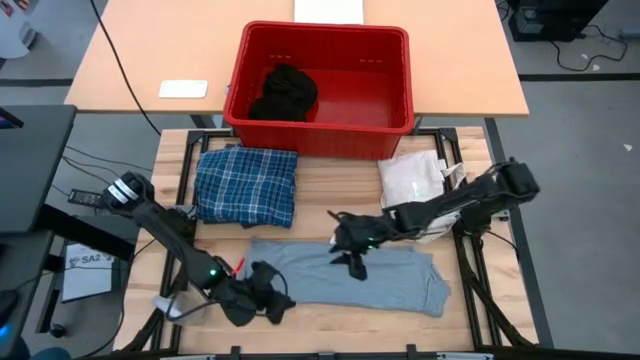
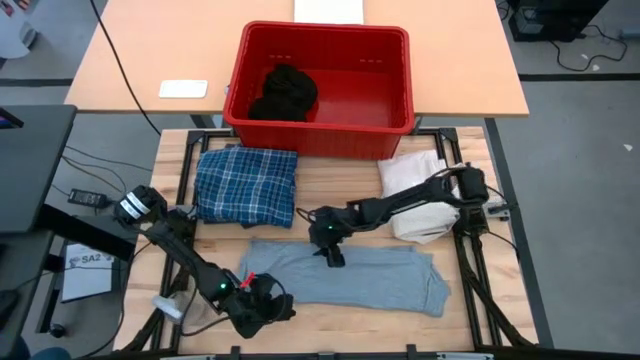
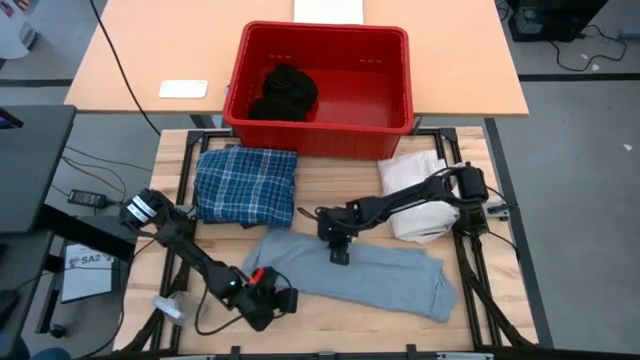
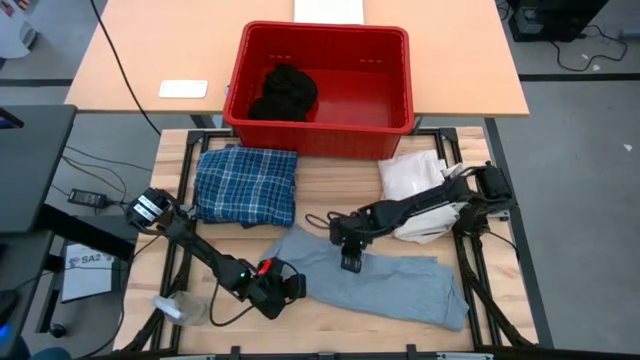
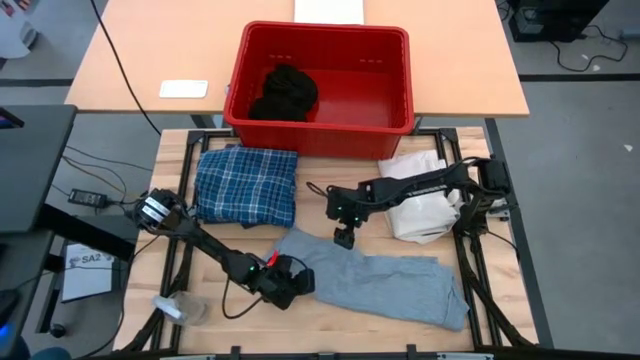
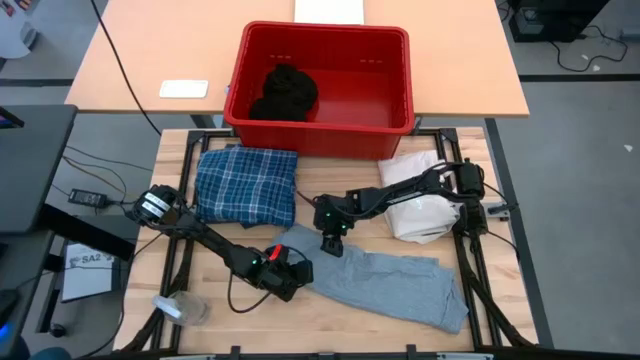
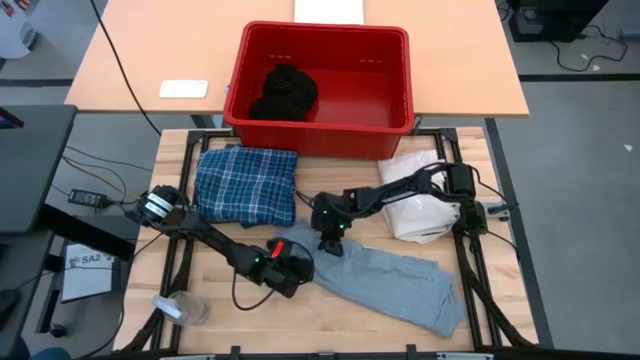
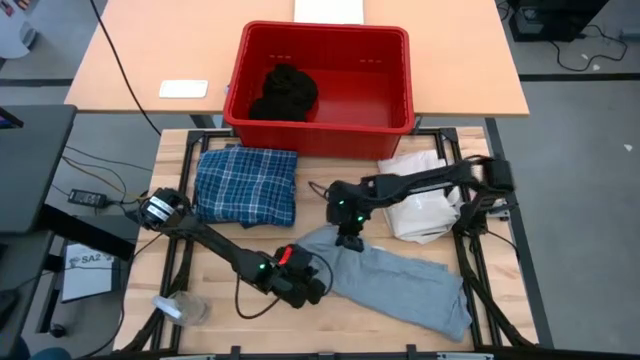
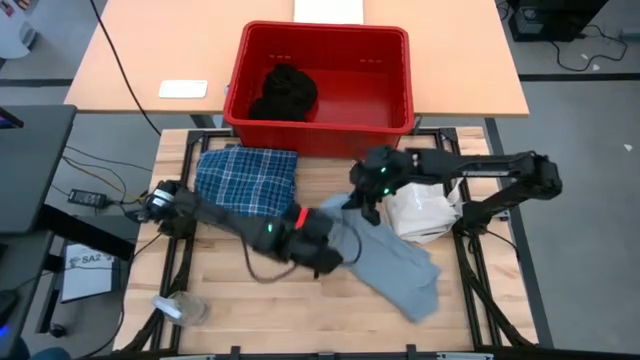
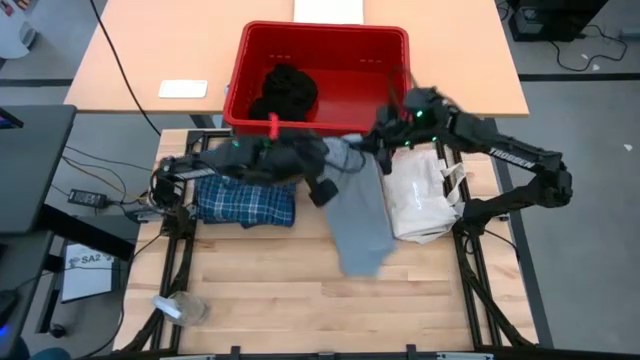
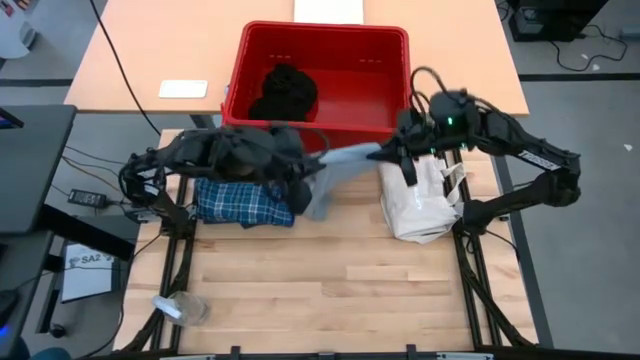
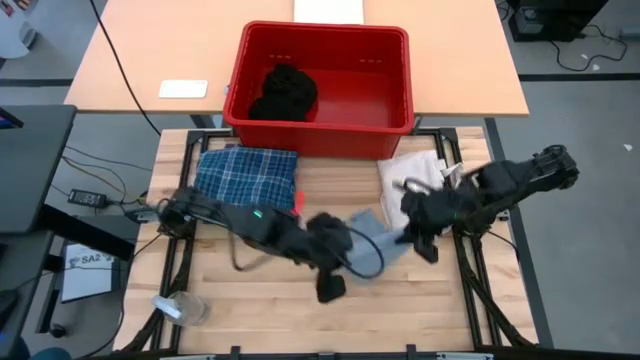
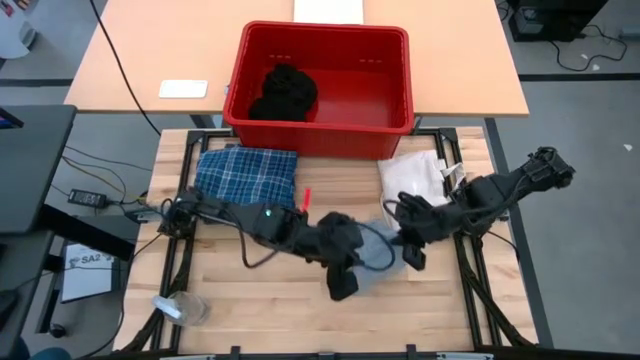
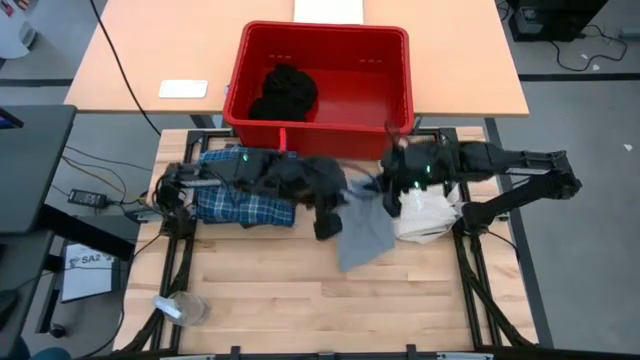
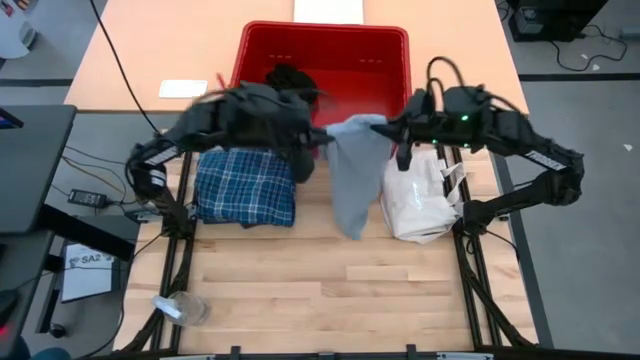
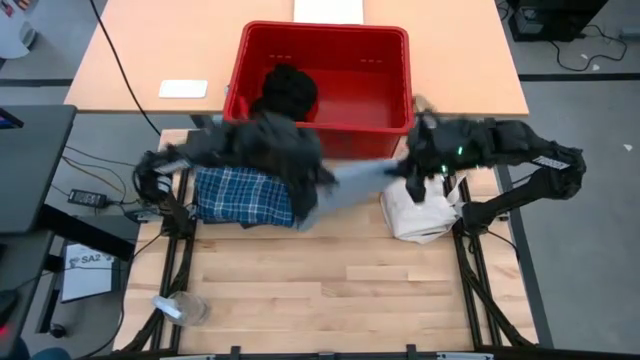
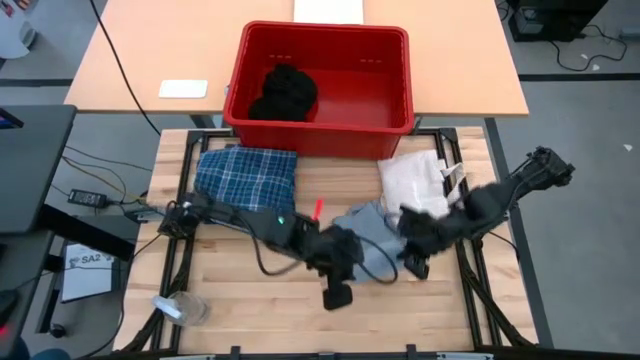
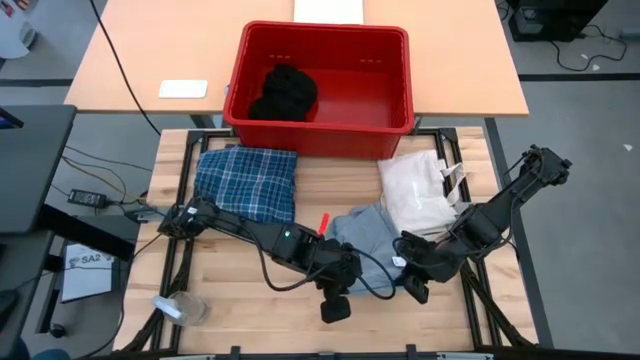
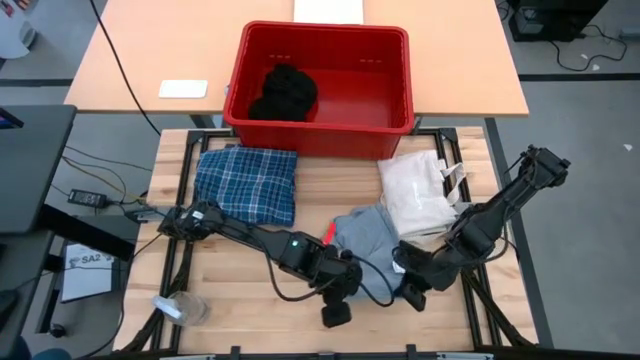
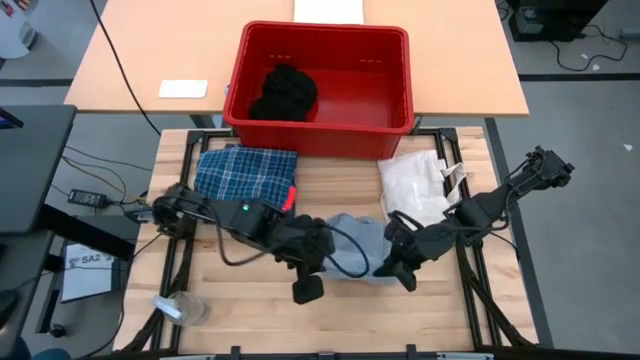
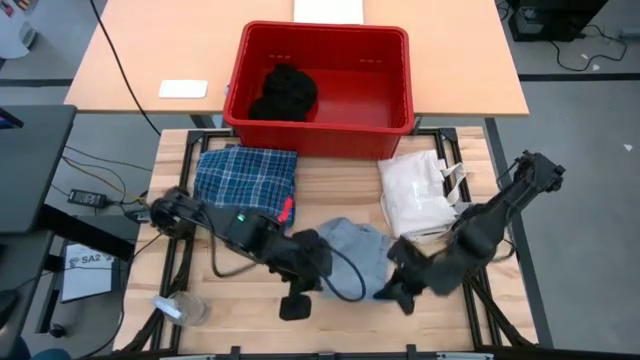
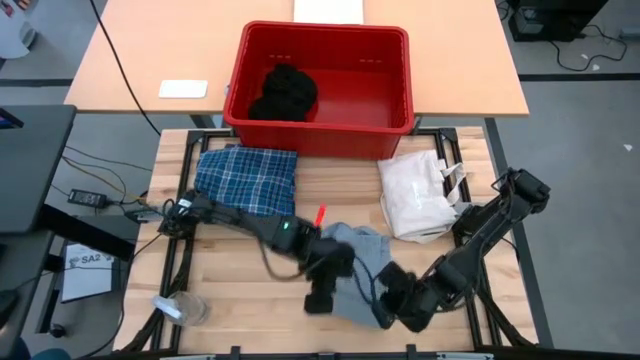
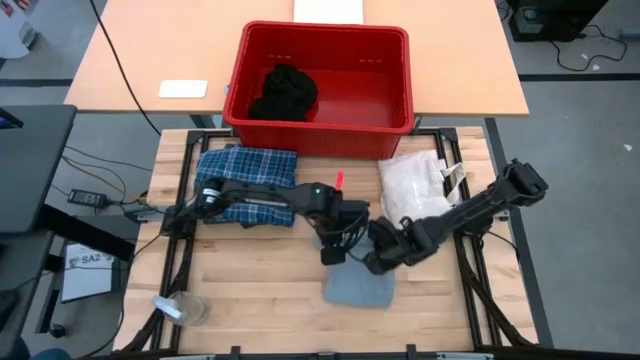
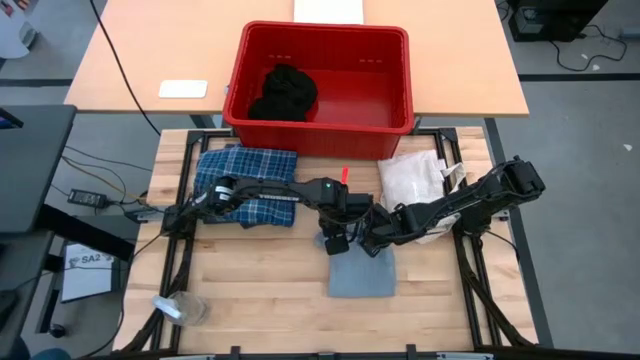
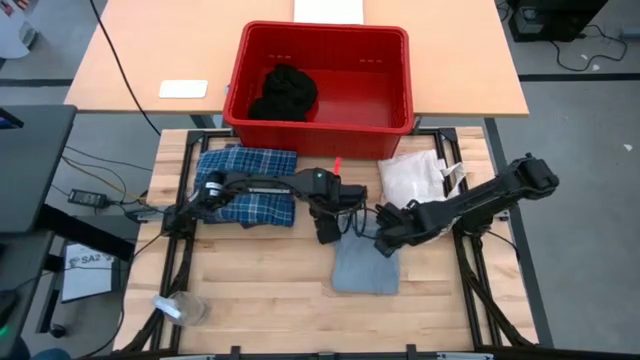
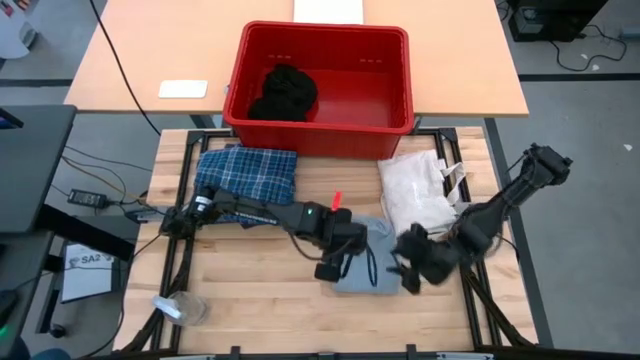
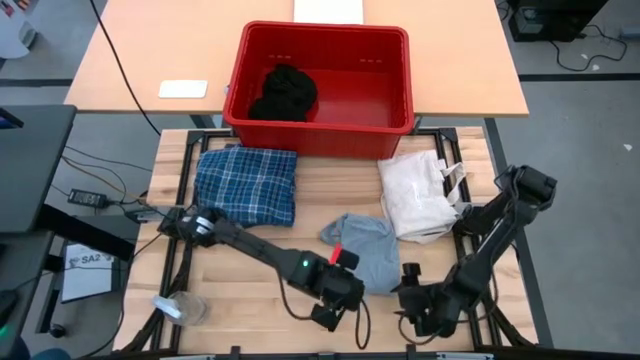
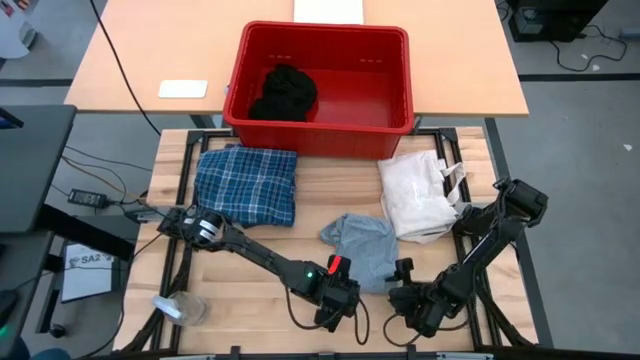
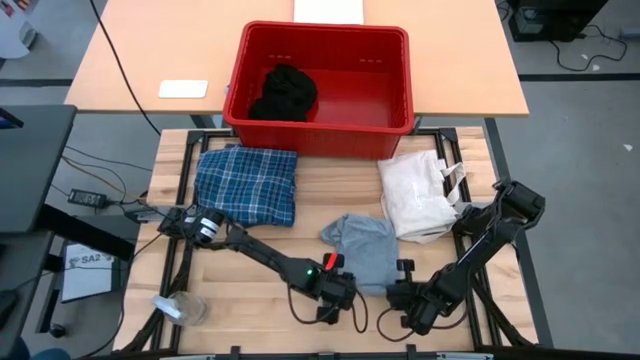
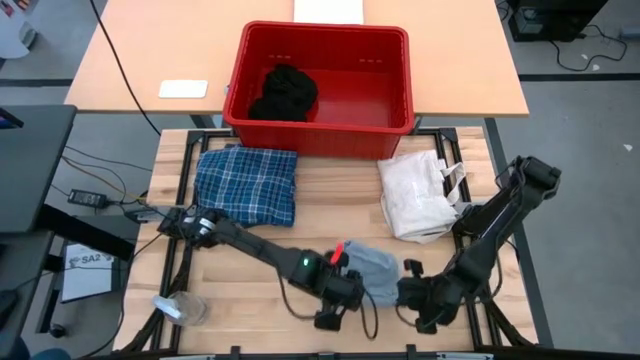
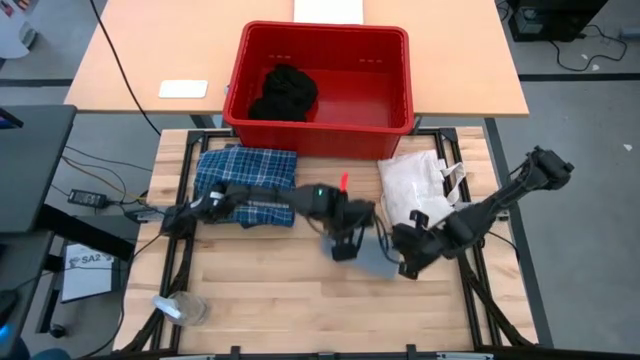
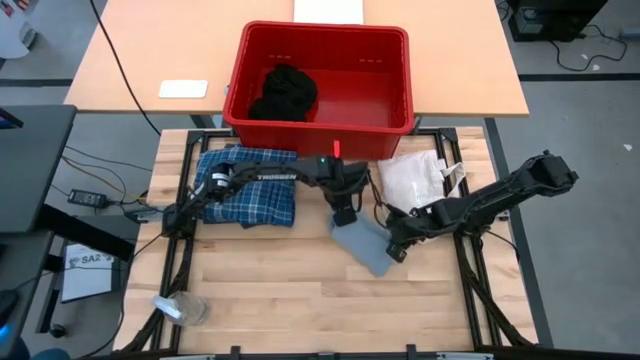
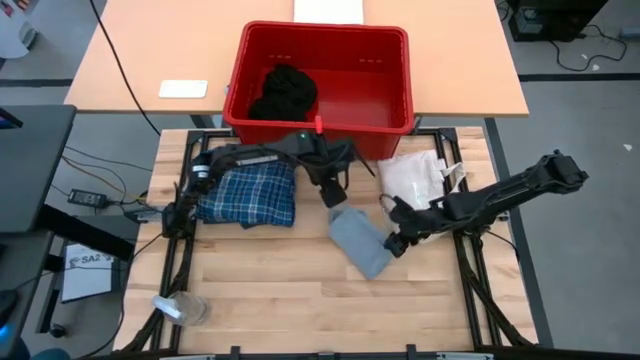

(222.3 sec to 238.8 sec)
Task: Fold Laundry from Bin
Fold the gray shirt

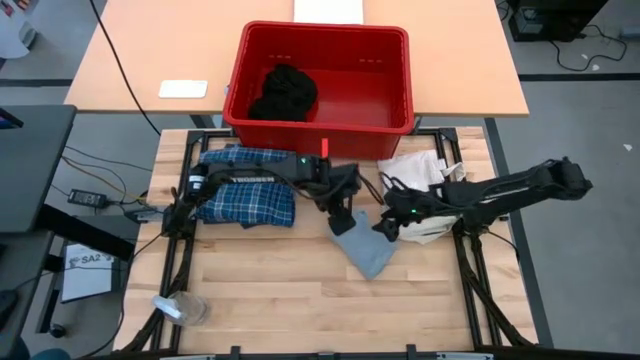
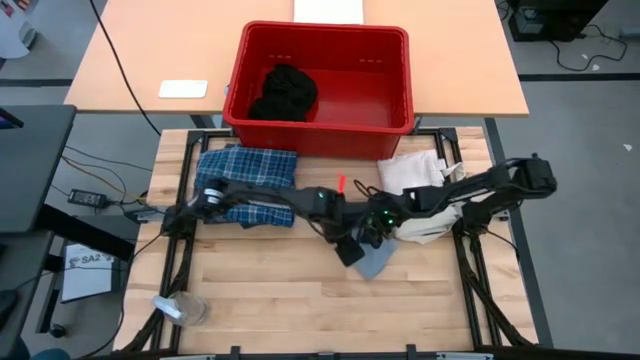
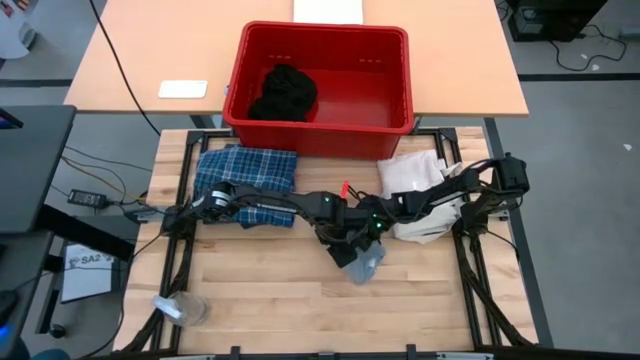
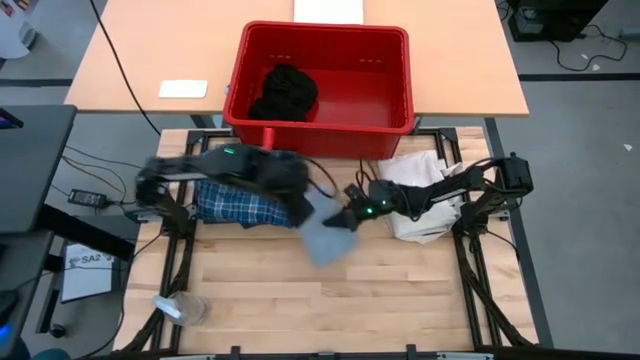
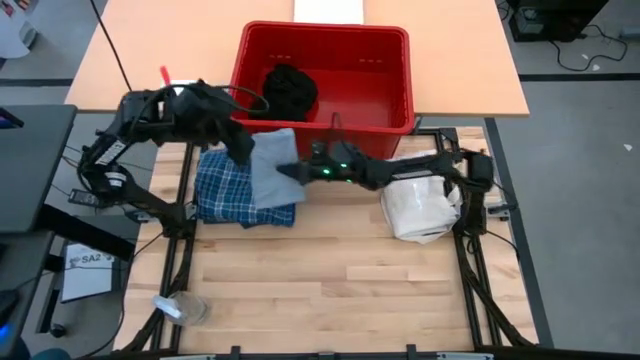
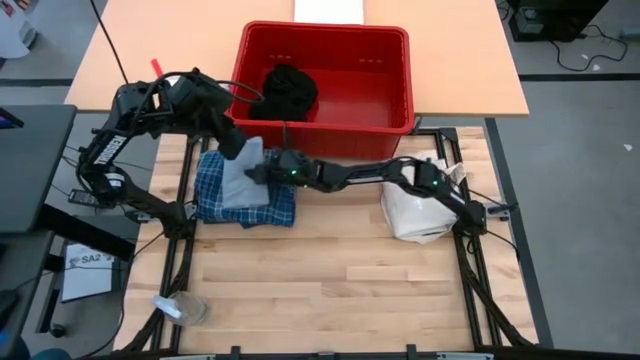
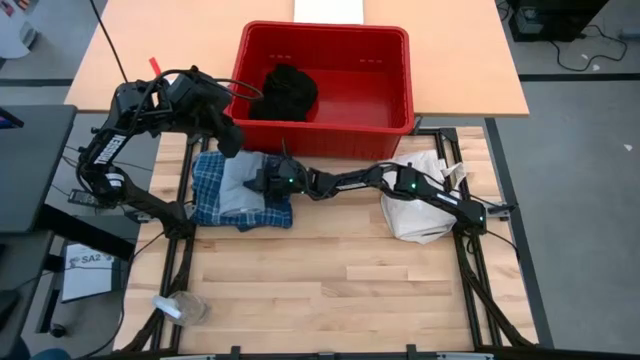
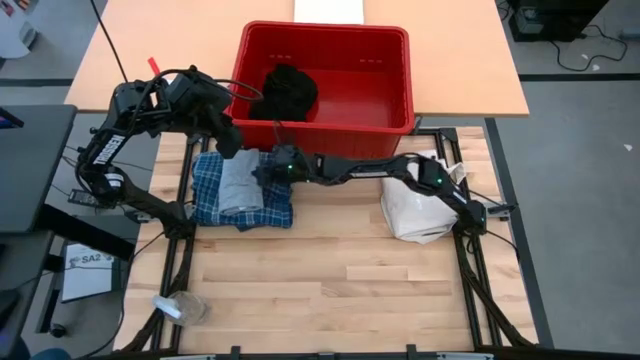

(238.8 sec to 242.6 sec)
Stack the gray shirt on top of the plaid pants

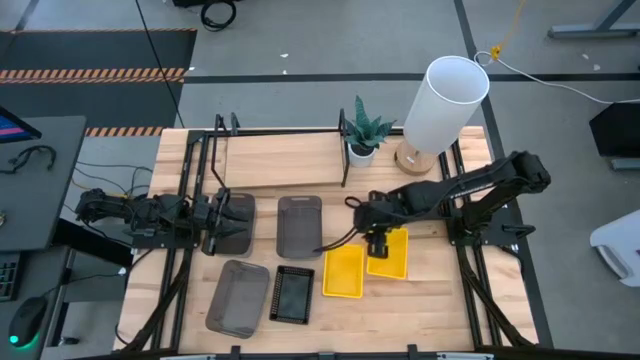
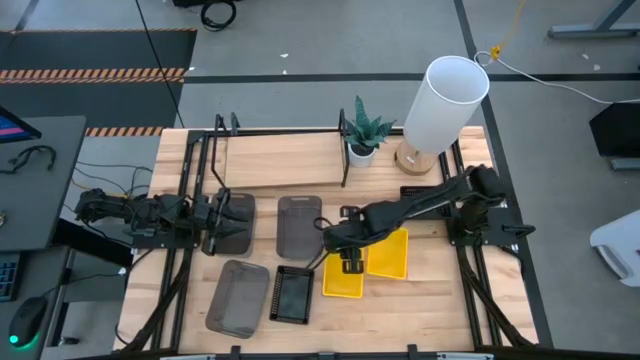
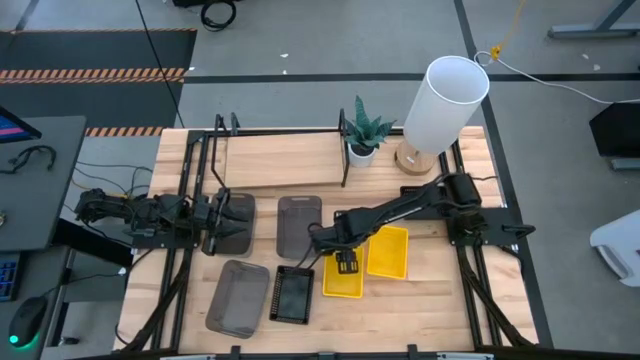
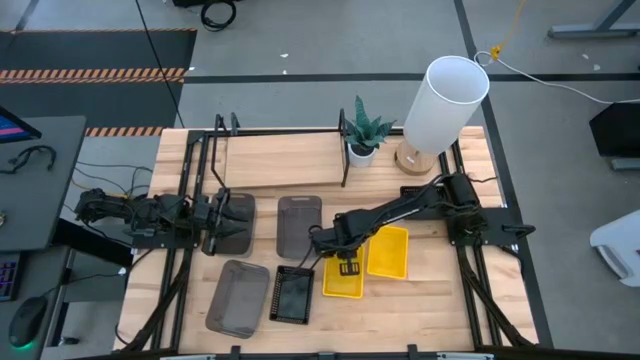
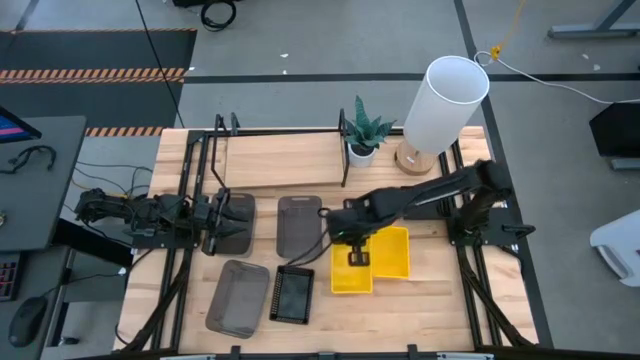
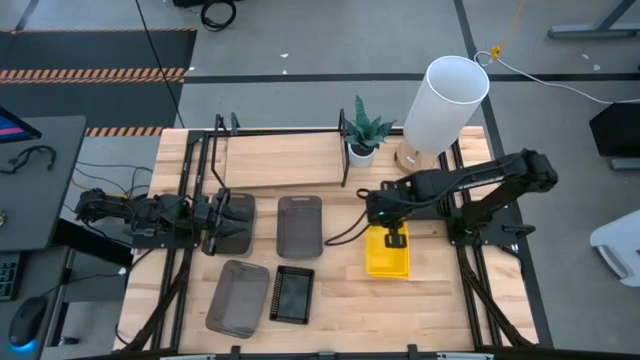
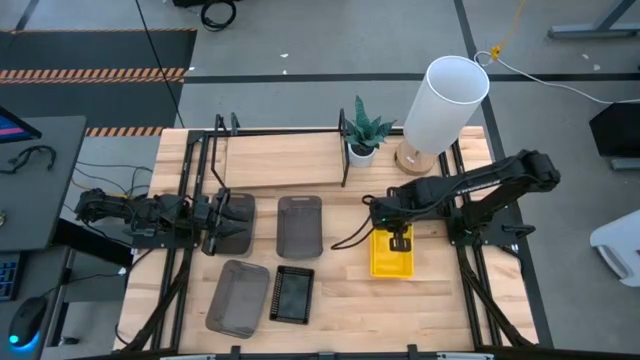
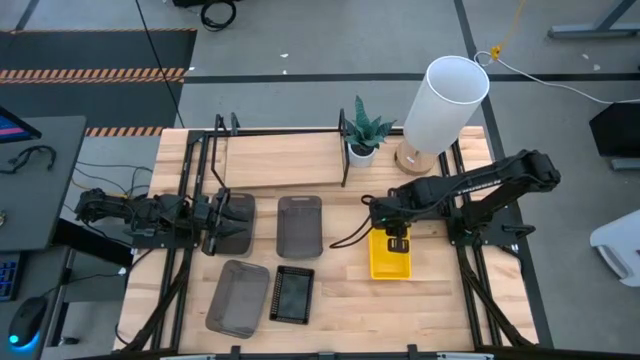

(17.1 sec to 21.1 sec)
Task: Stack baskets on shelf by color
Stack the left yellow bin on the top of the right yellow bins
